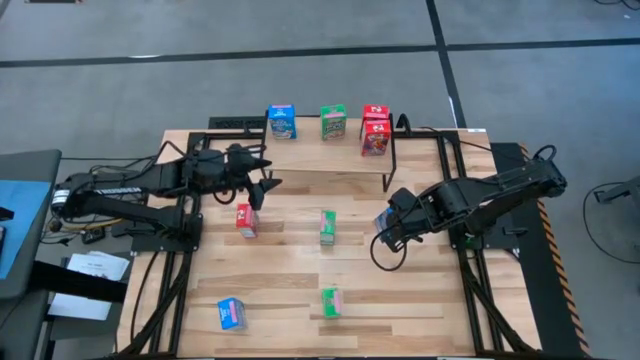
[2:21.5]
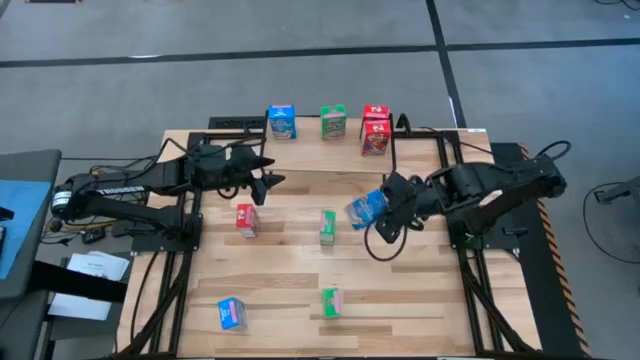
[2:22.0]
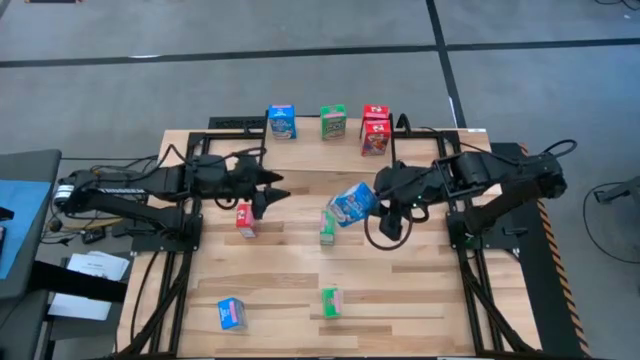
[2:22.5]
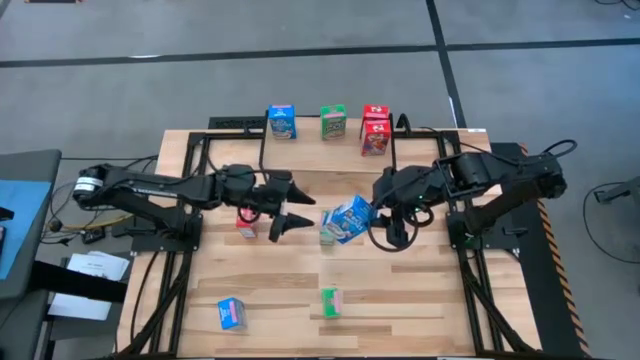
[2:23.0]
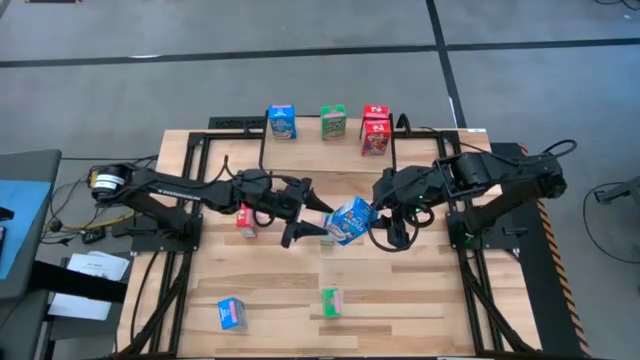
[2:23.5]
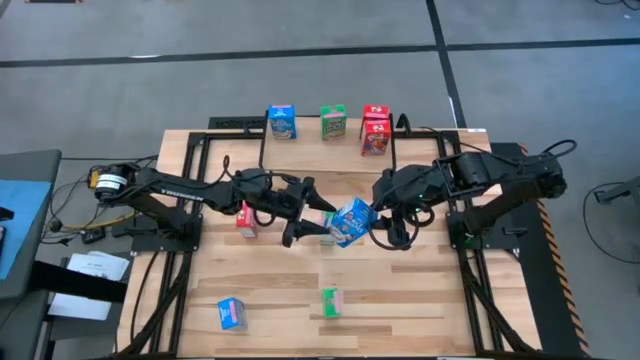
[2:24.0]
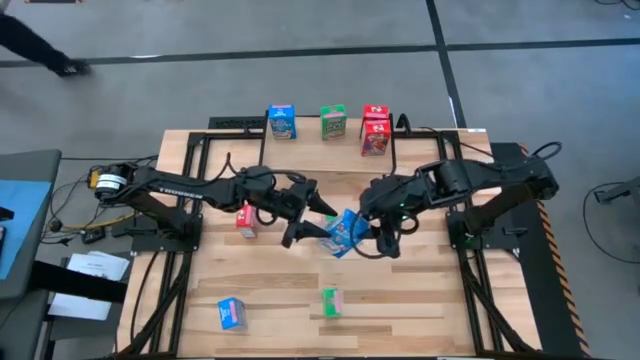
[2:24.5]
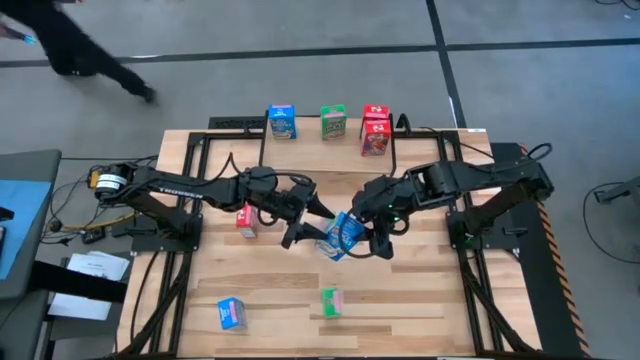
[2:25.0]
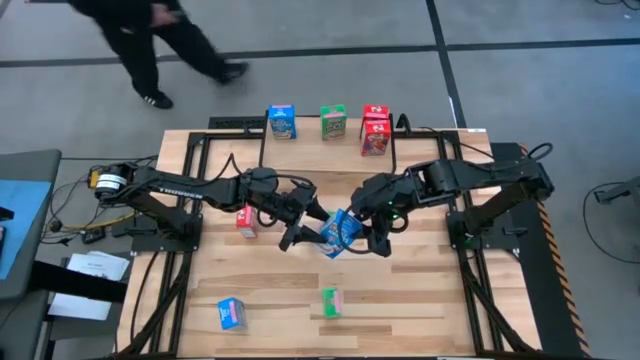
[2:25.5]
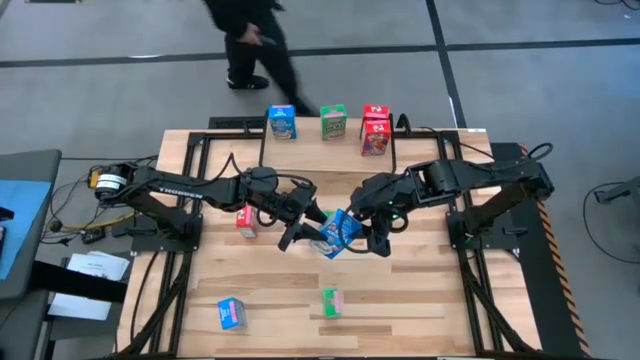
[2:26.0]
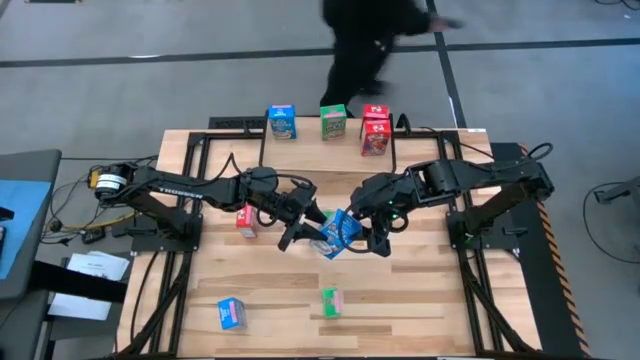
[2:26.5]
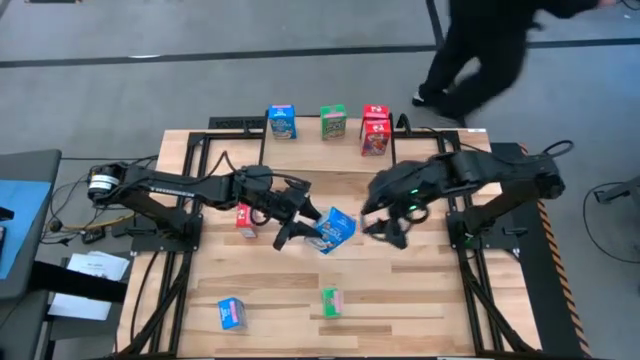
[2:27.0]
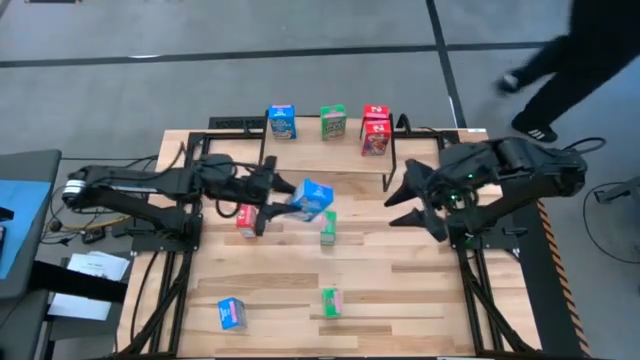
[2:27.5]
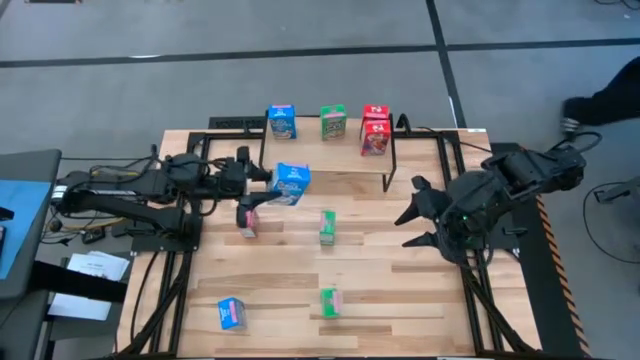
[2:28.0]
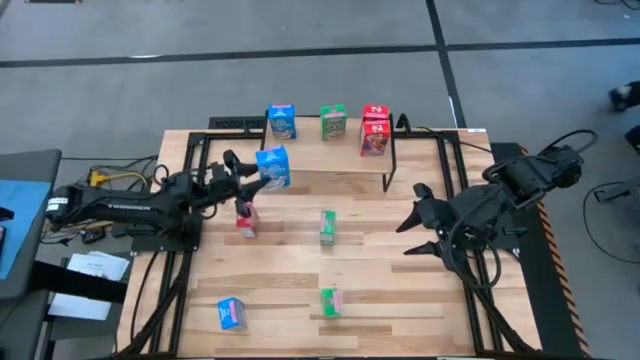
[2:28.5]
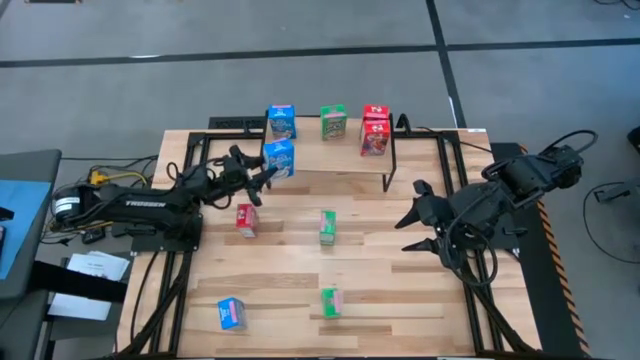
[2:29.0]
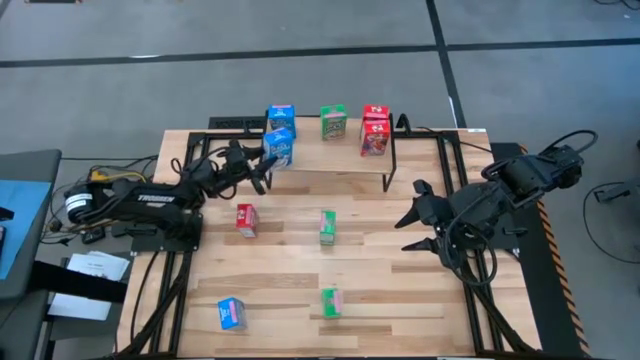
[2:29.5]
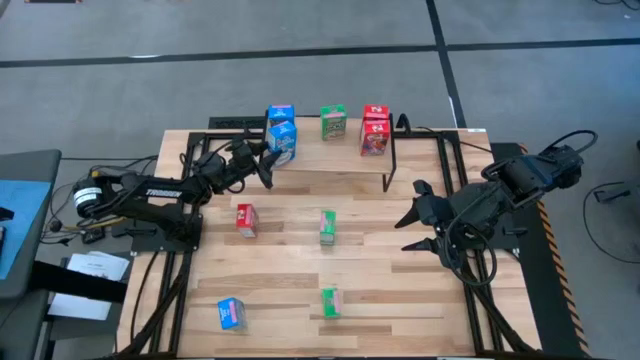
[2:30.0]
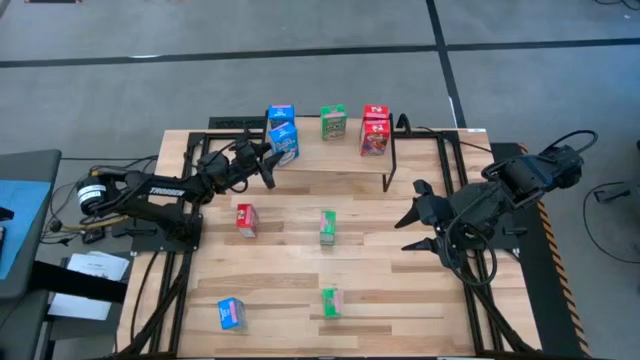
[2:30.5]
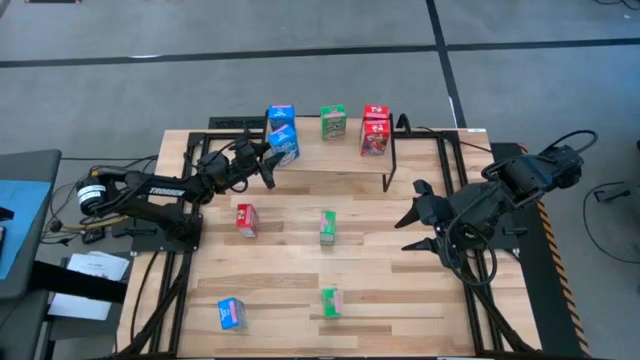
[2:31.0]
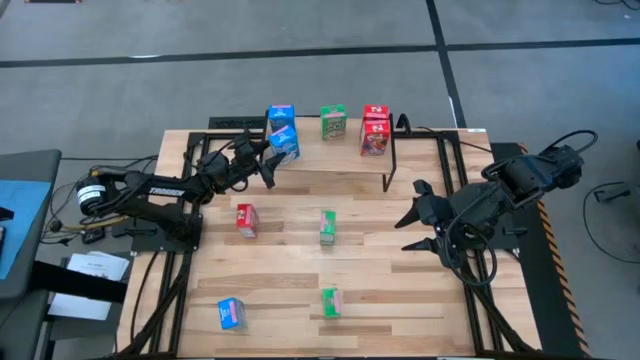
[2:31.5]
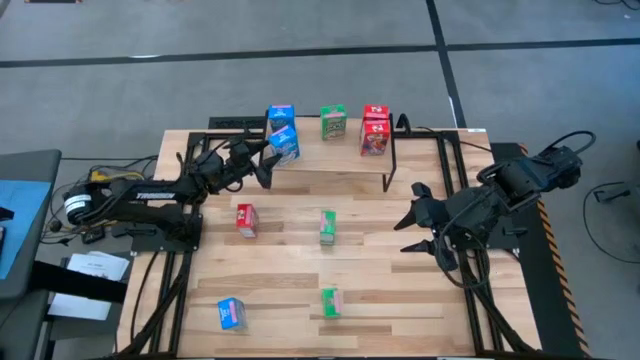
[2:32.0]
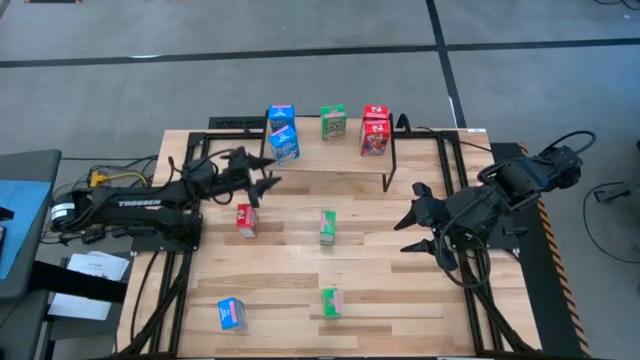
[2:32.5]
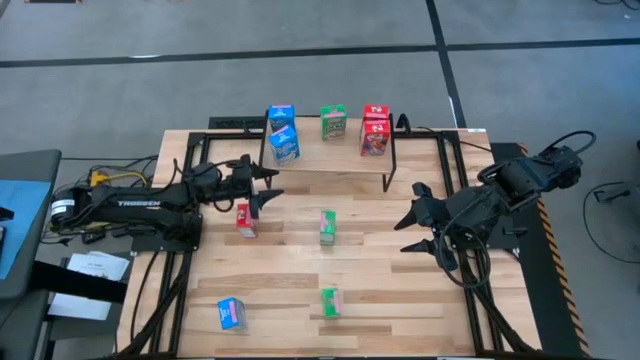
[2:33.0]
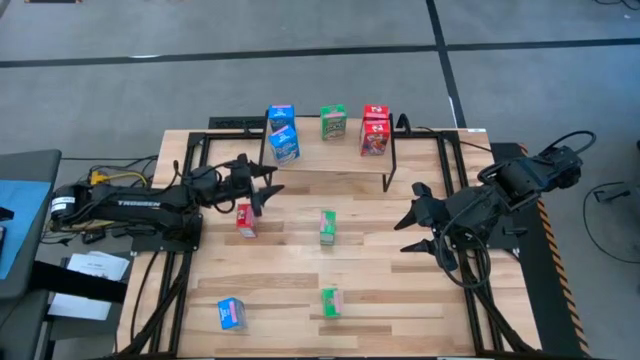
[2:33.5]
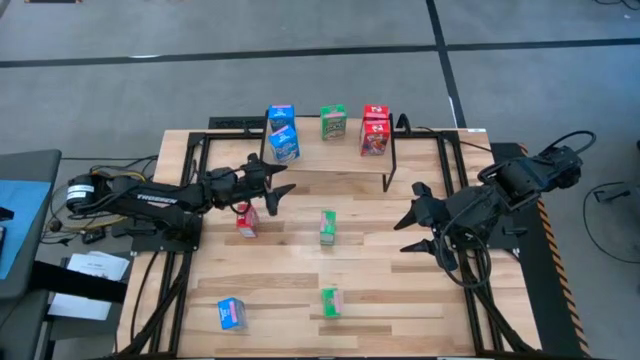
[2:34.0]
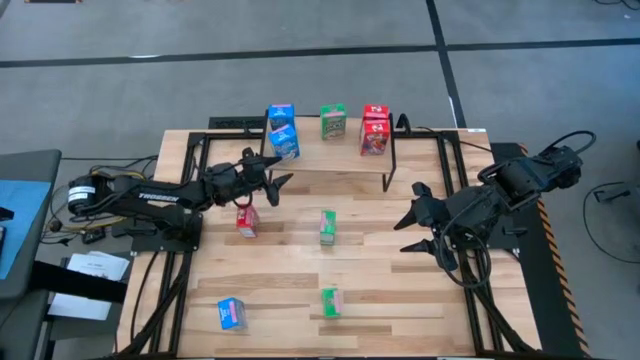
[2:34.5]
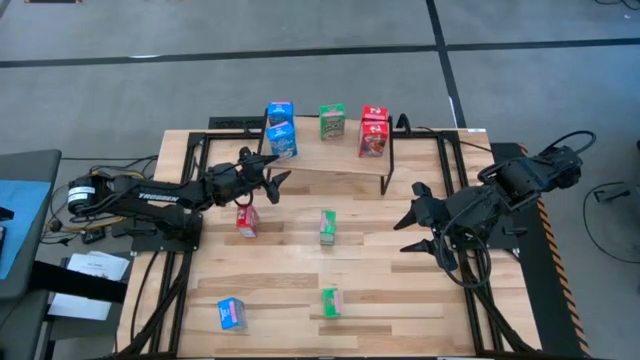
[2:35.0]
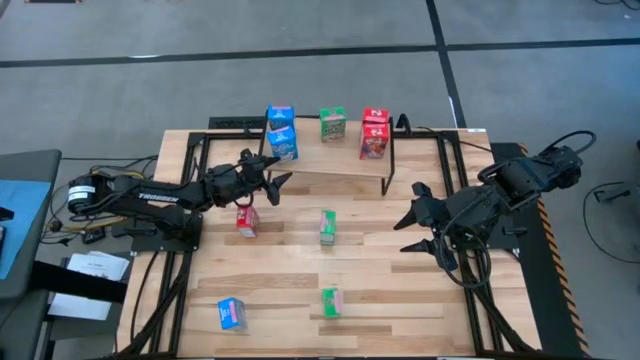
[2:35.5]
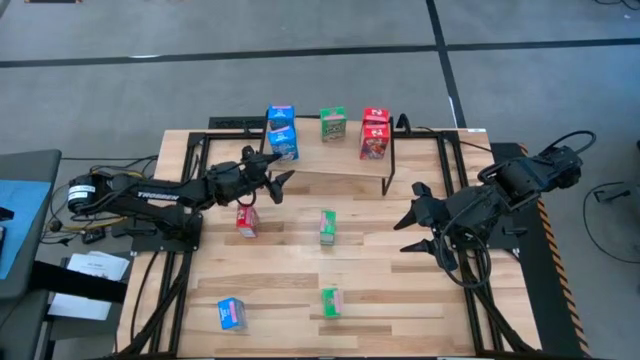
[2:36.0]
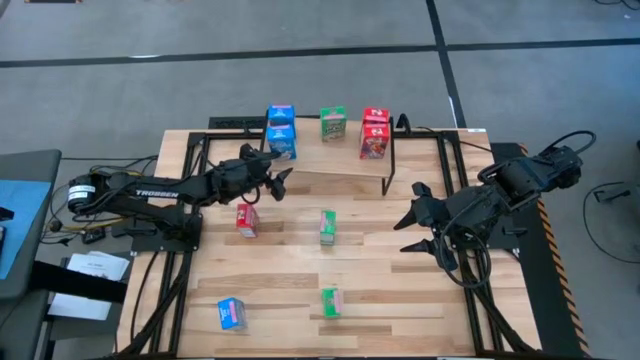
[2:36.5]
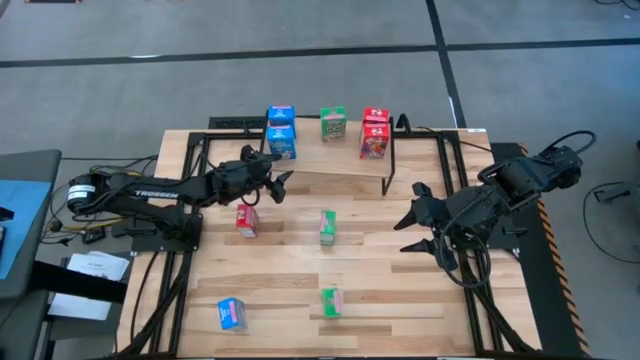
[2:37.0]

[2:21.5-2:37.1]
Task: Stack cereal on shelf
Put the top blue cereal box on the shelf aligned with the other blue cereal box

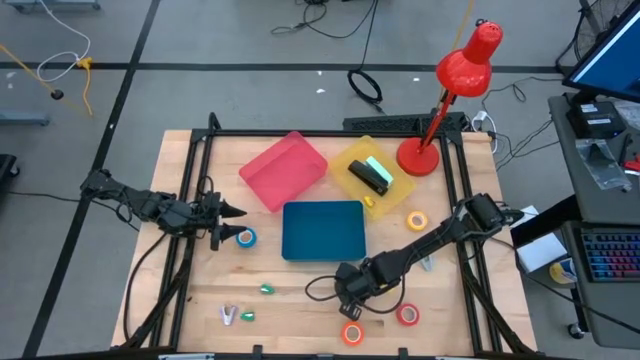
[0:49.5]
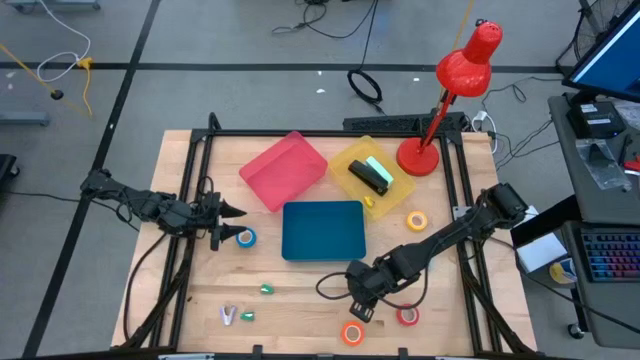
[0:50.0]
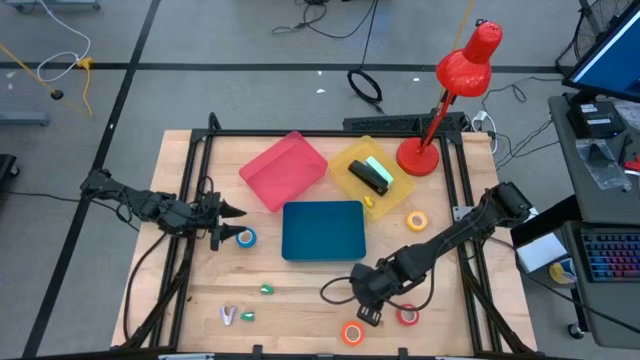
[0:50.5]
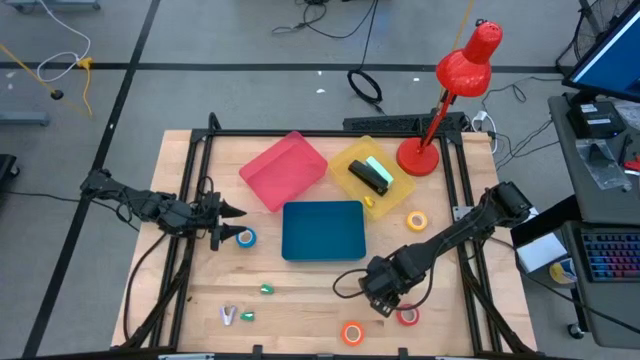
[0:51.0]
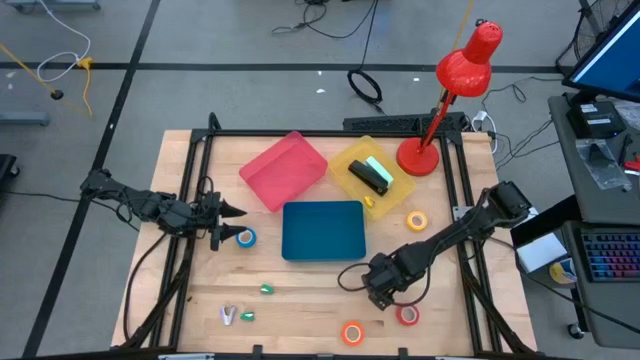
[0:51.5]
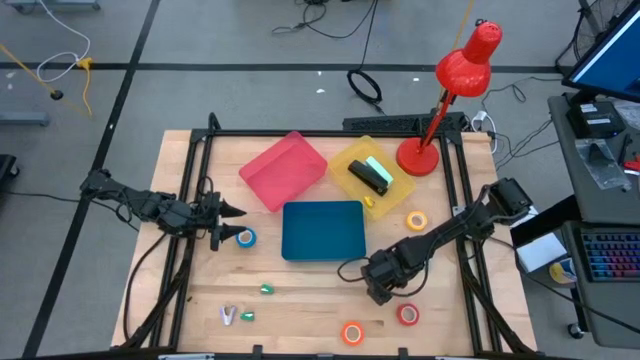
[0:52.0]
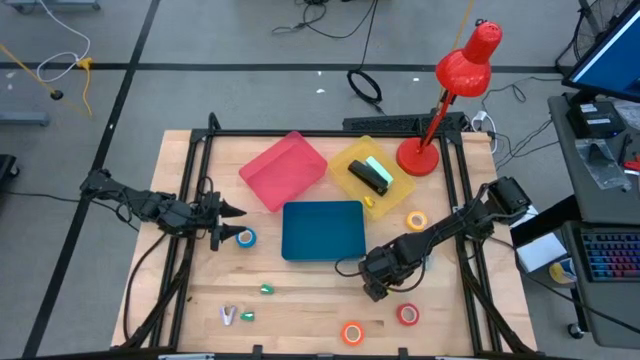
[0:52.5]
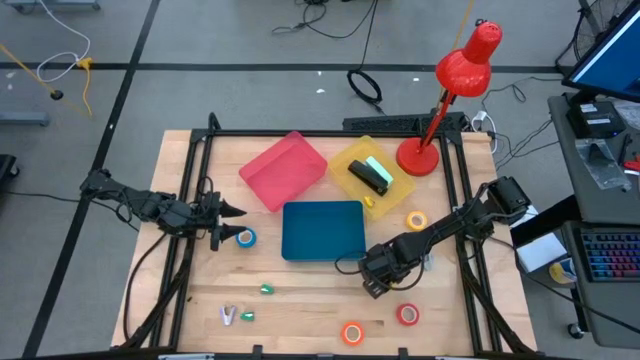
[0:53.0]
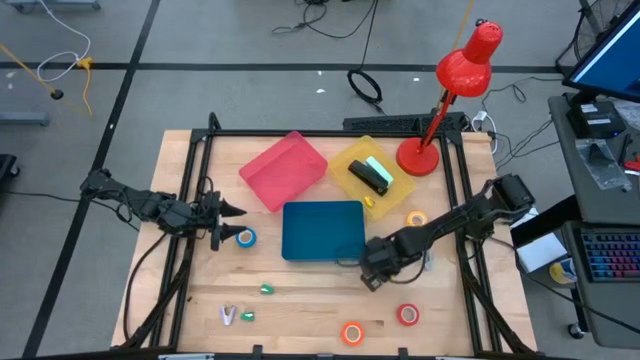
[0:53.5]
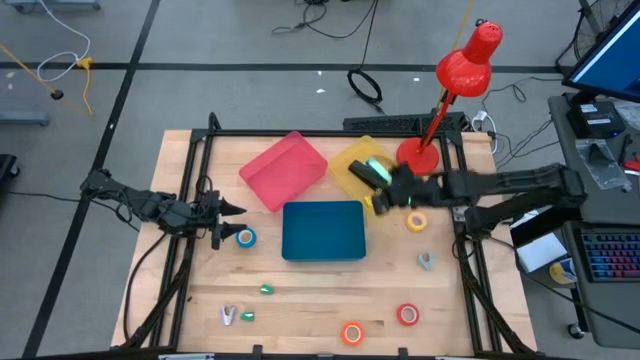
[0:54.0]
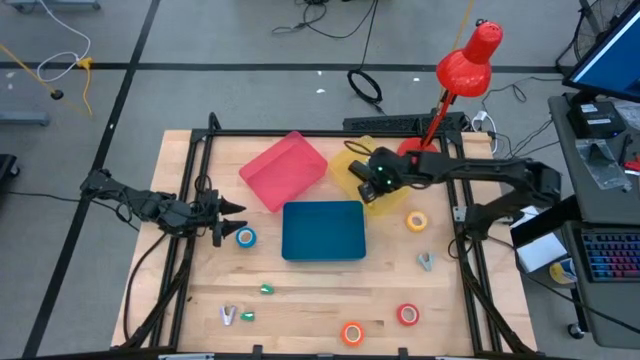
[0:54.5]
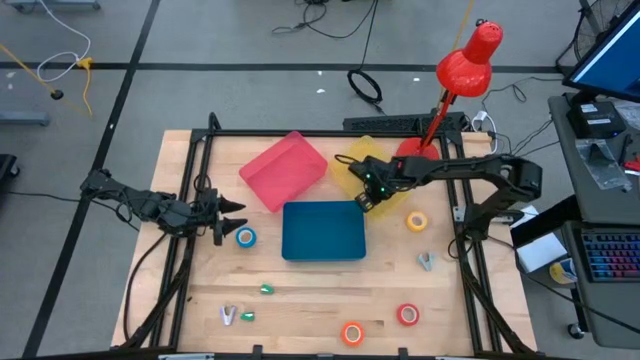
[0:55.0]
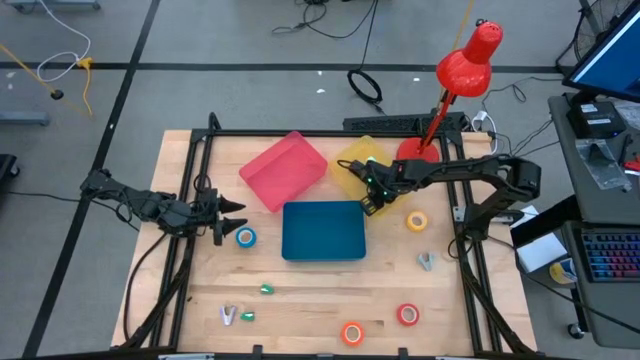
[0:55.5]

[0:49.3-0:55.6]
Task: Pick and place Stapler, Stapler remover, tape
Put the yellow stapler into the yellow bin
